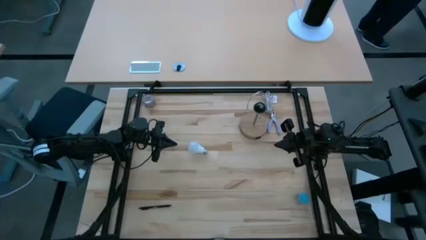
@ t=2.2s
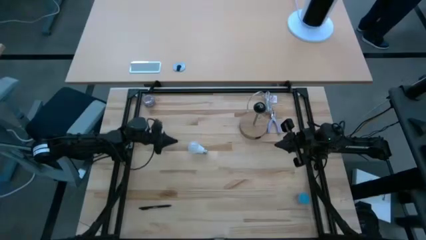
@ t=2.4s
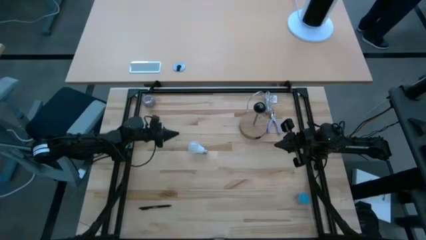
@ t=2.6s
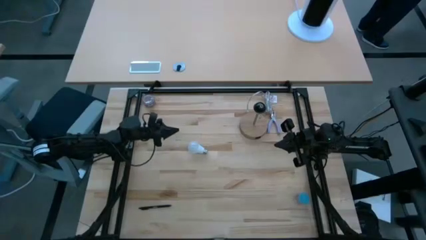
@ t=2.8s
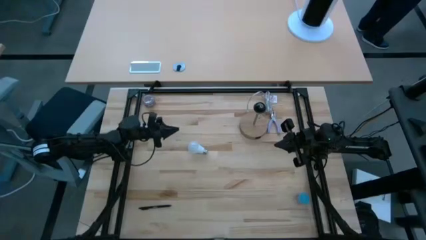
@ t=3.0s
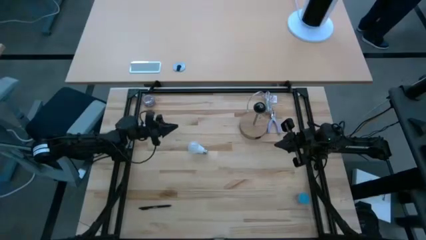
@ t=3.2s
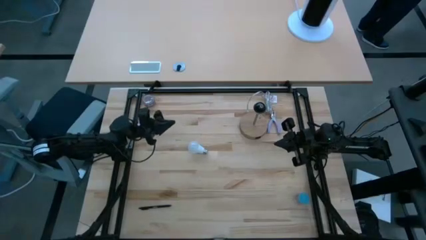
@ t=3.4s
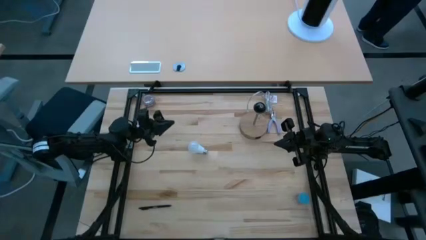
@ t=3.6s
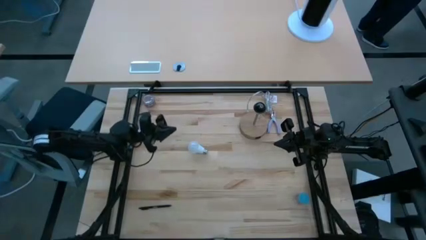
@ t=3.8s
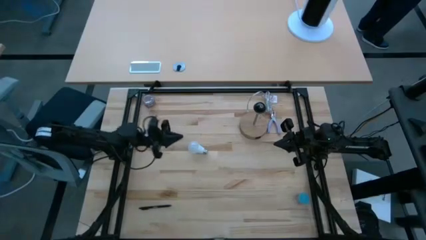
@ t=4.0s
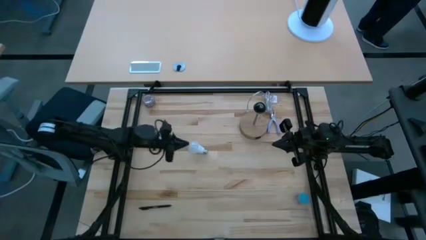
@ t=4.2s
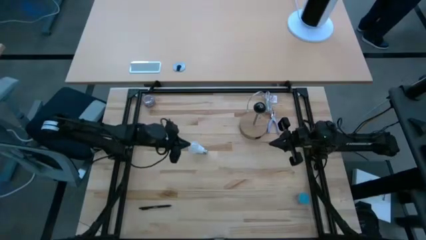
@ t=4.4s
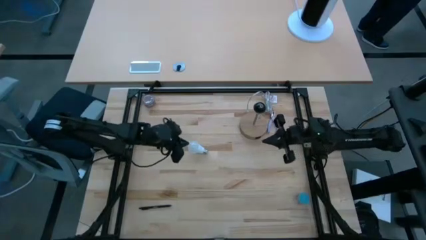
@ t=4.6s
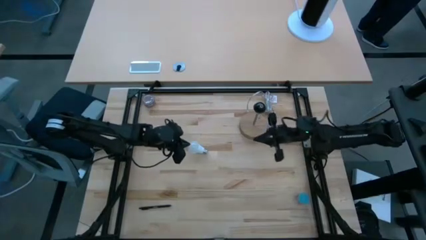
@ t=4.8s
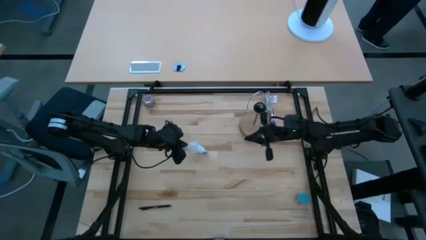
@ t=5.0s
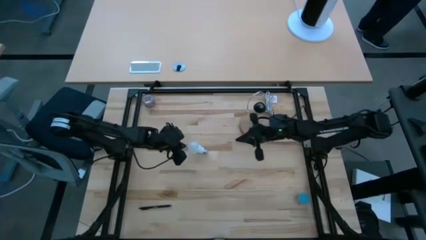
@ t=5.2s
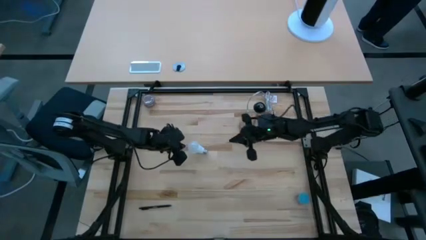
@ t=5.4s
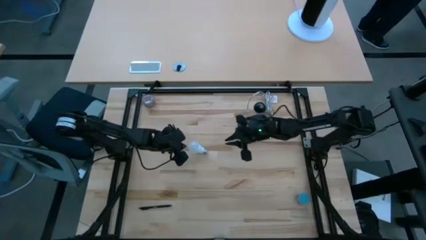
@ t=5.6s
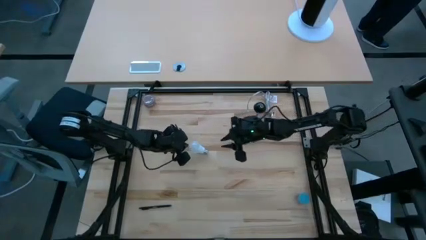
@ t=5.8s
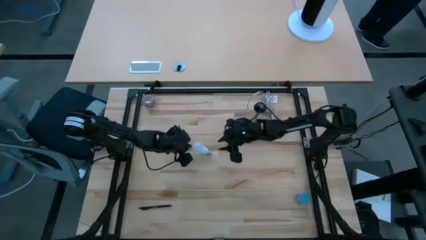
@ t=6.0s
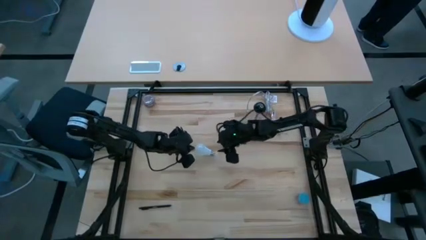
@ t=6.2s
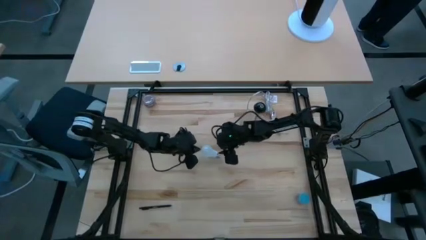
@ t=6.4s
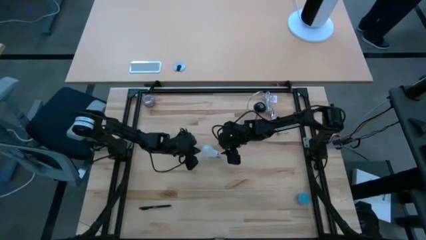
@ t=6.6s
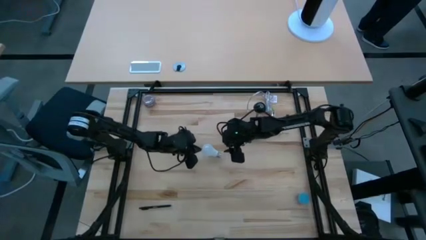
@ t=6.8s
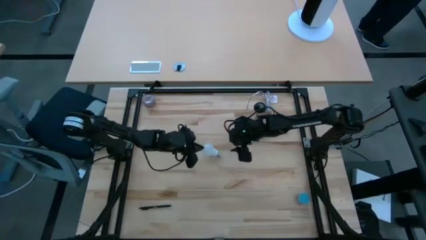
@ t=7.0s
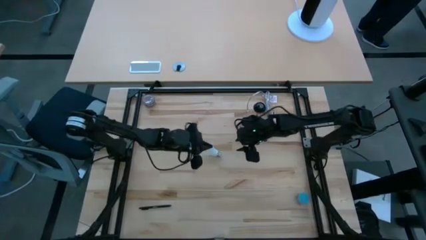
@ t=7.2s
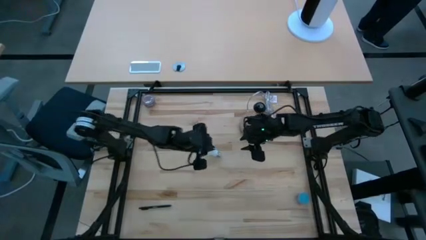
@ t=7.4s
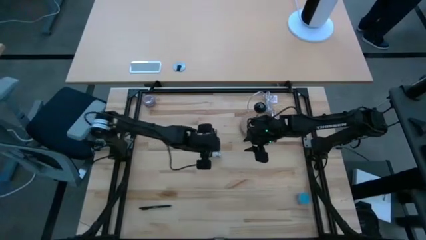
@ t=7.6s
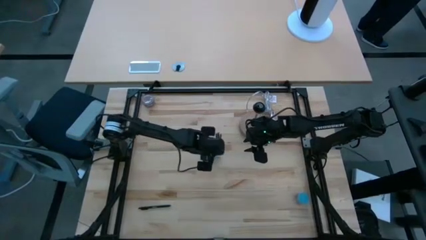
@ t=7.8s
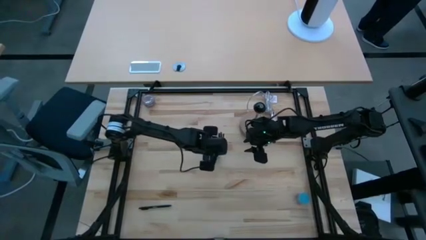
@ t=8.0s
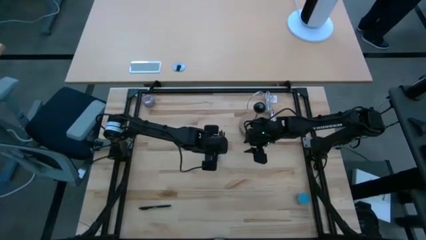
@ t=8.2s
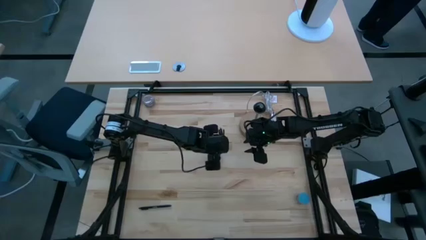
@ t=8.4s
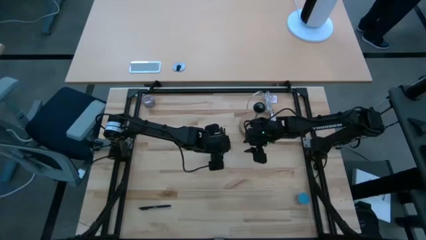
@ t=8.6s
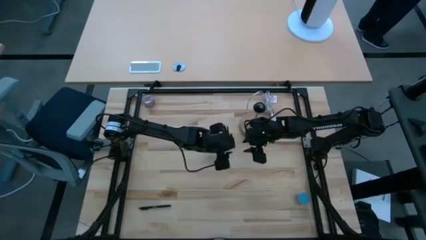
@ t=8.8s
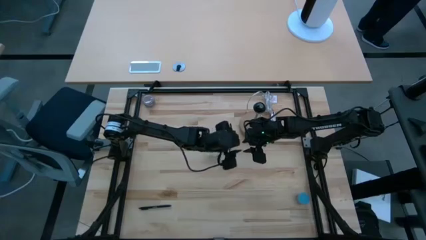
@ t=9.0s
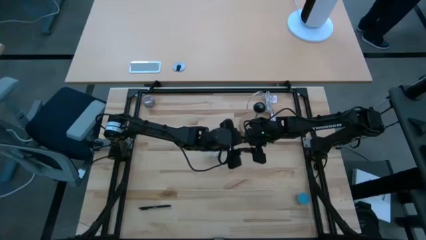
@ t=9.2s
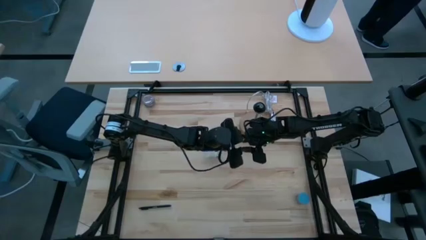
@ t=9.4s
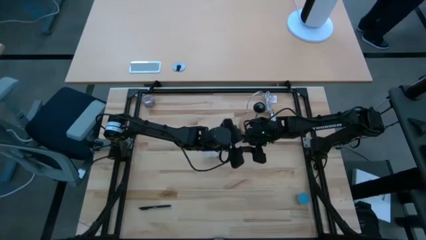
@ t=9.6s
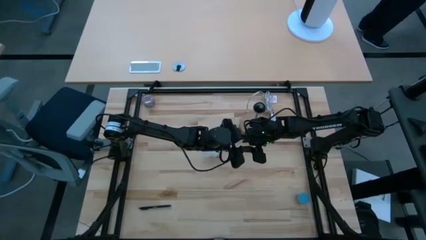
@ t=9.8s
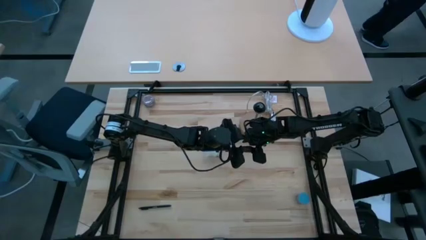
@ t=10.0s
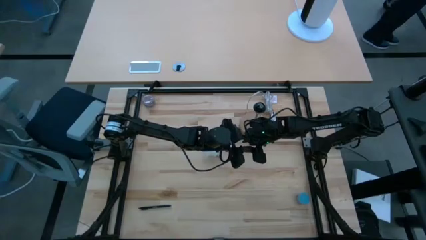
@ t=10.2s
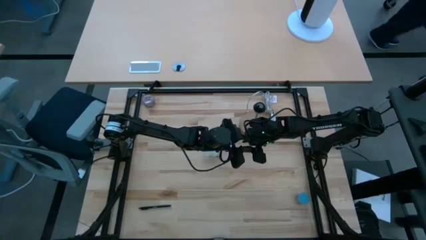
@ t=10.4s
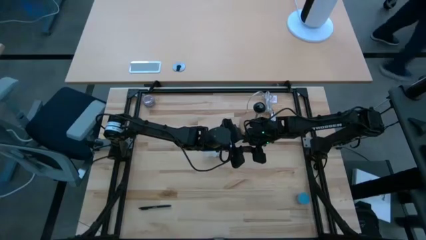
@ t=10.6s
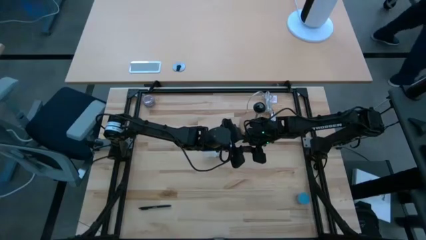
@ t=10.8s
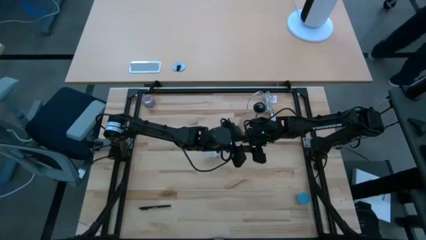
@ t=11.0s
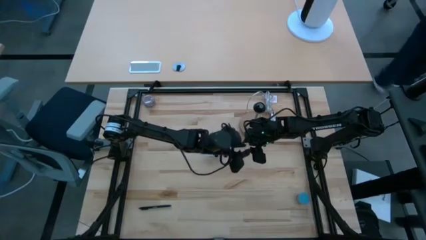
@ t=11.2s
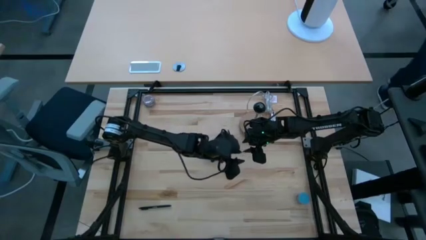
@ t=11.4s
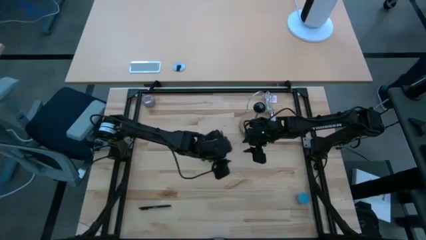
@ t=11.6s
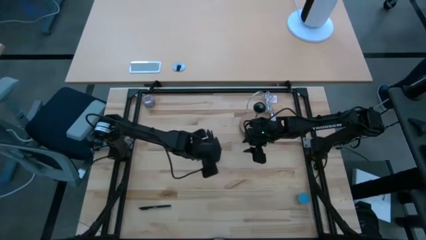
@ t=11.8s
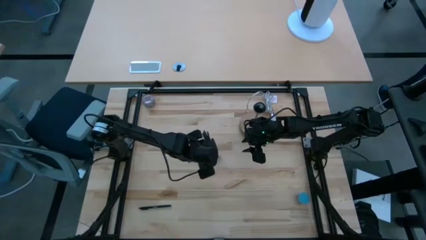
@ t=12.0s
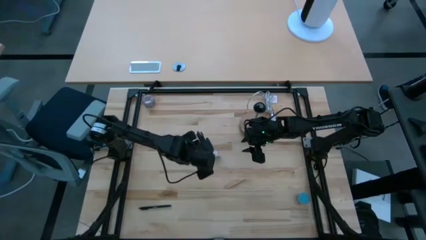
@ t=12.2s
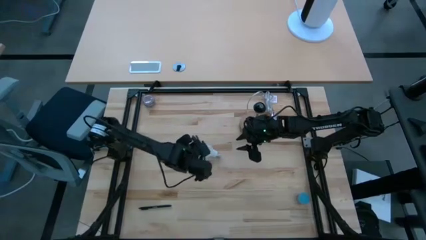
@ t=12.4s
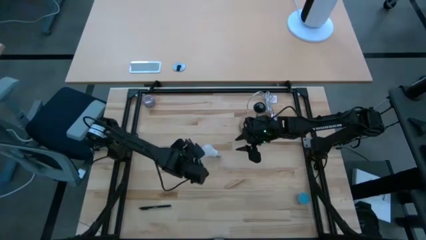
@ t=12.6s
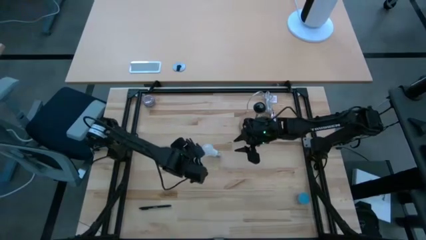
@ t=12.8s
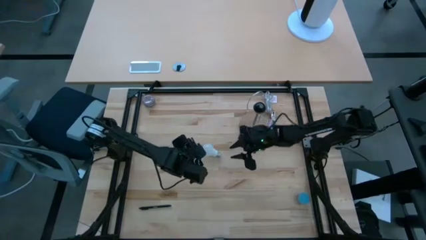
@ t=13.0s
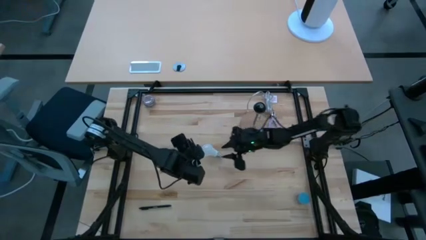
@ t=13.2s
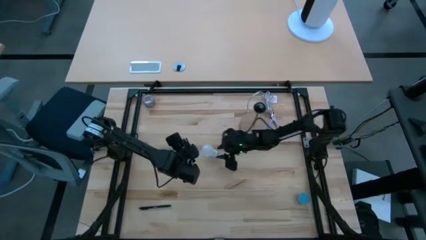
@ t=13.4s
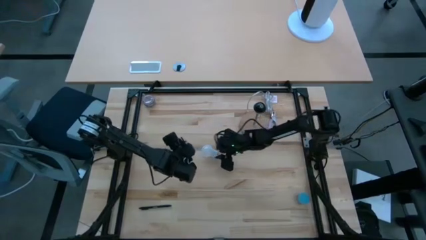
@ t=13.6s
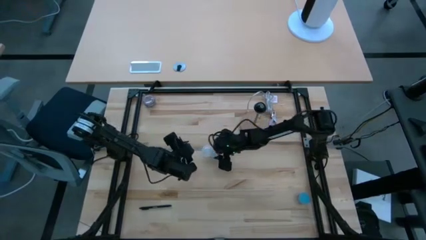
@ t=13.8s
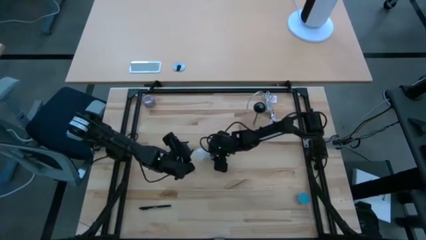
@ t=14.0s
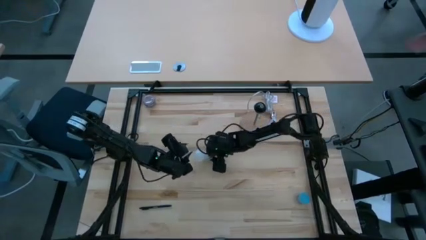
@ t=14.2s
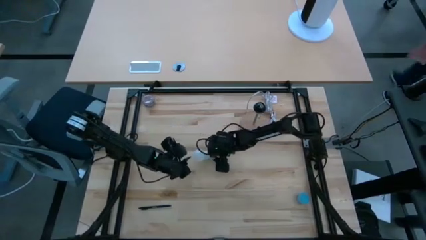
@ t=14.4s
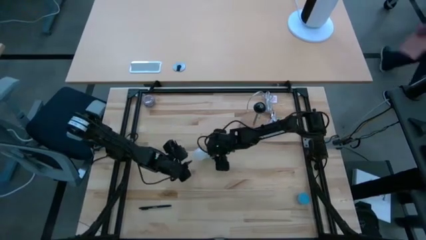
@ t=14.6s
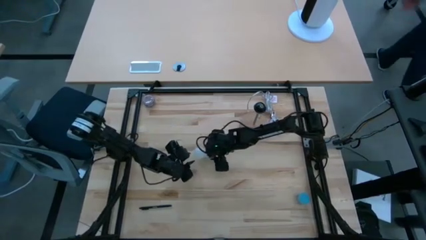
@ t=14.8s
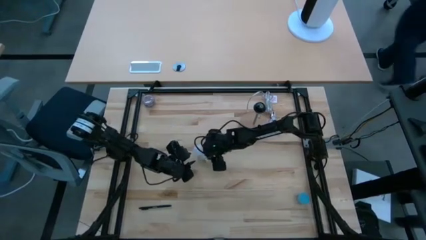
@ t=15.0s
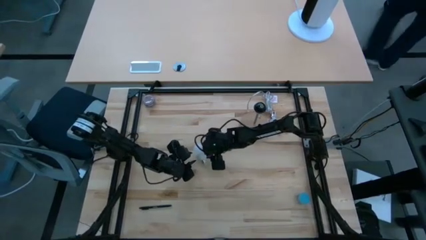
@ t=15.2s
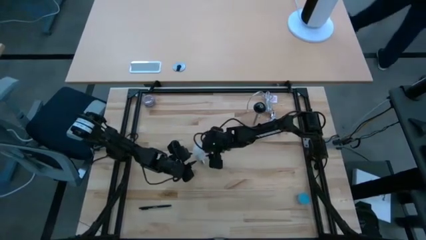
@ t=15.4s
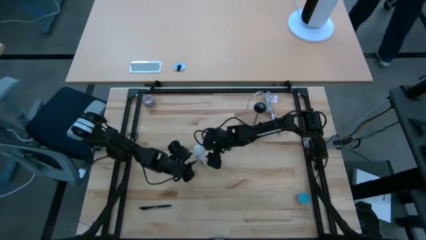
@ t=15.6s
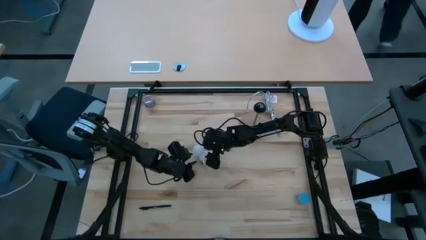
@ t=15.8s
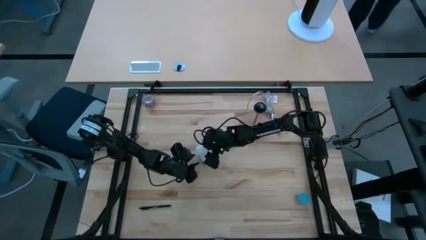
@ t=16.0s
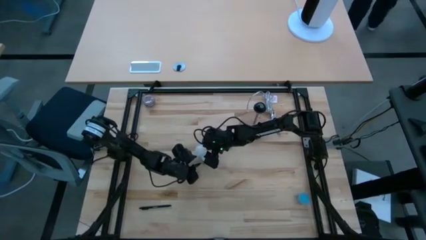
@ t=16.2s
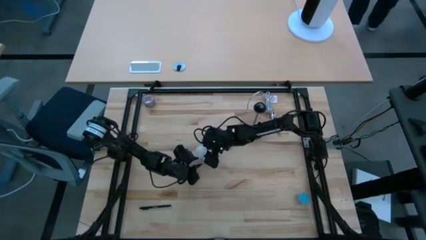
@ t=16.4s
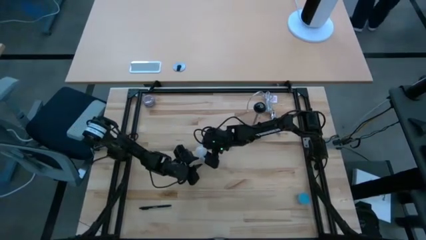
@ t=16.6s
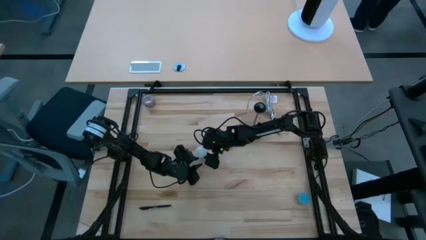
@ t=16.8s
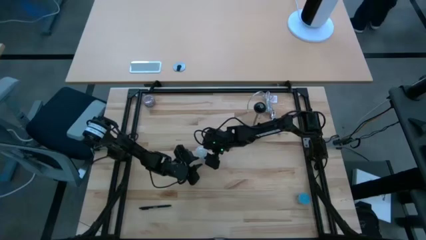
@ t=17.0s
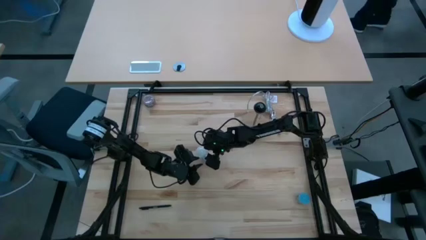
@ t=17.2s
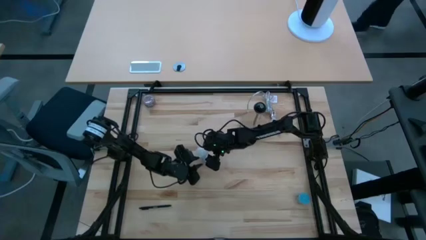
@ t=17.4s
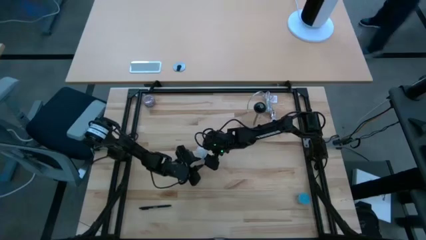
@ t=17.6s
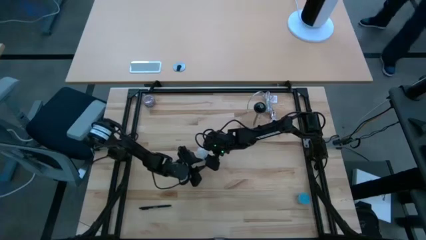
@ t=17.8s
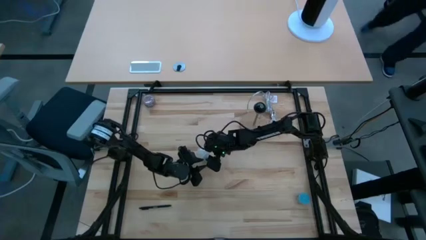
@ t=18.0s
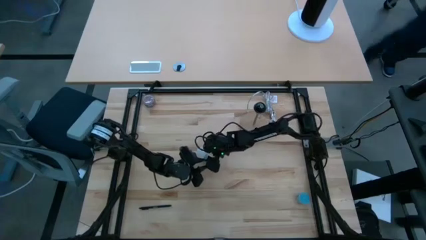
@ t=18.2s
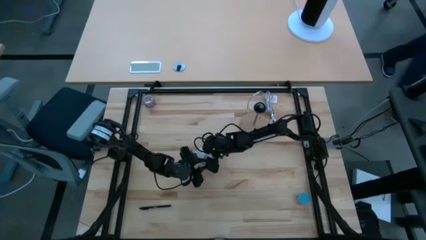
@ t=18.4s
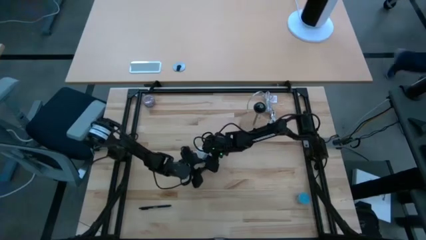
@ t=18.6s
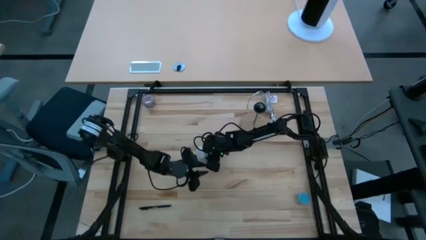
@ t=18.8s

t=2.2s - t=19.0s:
Task: Screw lightbulb
Insert the lightbulb on the lamp
